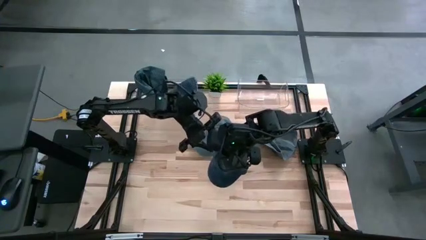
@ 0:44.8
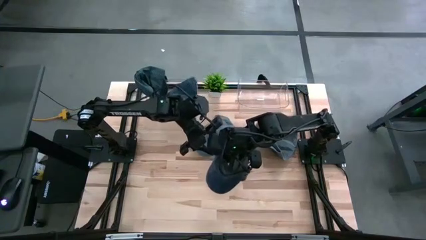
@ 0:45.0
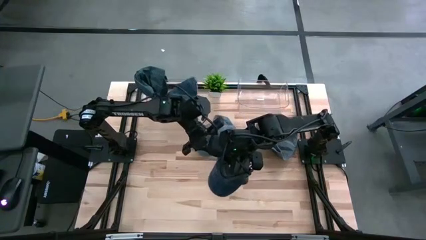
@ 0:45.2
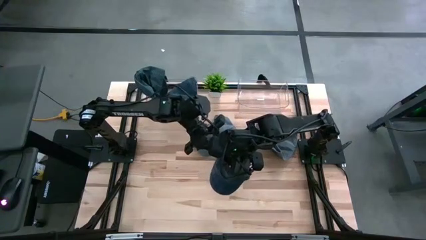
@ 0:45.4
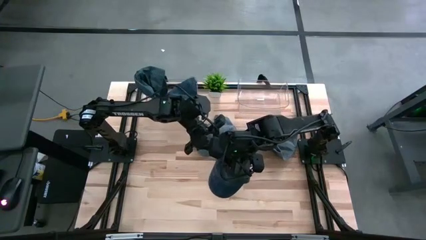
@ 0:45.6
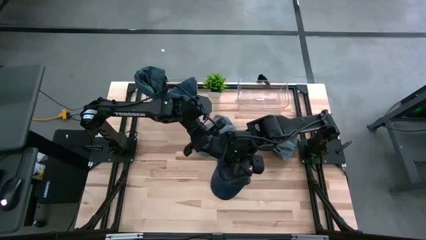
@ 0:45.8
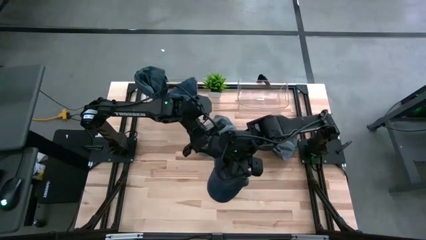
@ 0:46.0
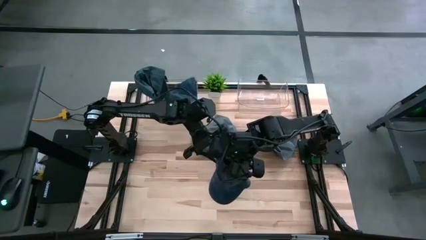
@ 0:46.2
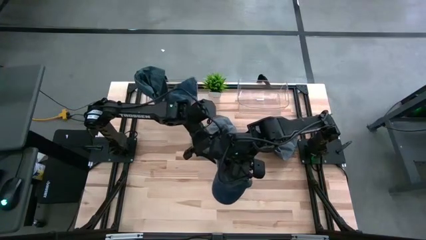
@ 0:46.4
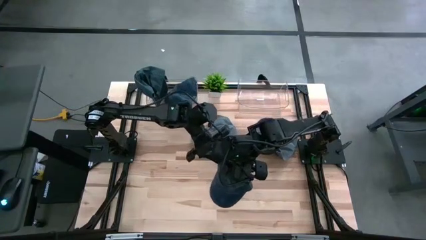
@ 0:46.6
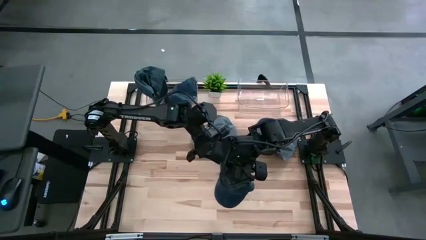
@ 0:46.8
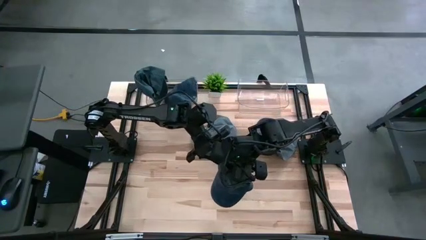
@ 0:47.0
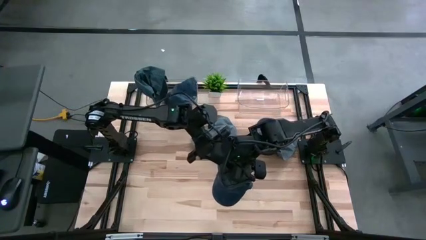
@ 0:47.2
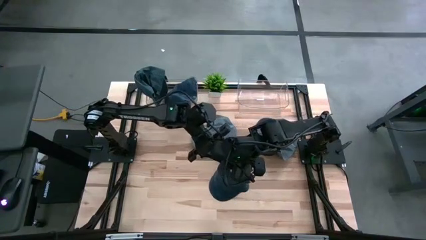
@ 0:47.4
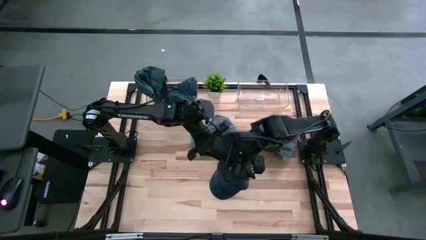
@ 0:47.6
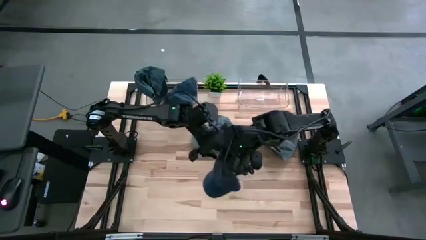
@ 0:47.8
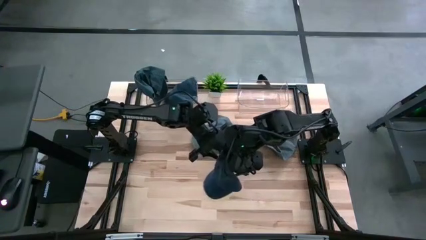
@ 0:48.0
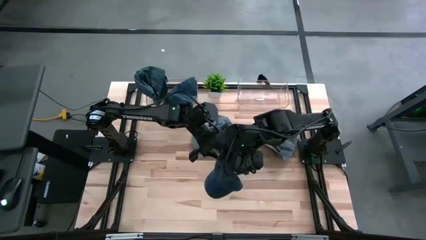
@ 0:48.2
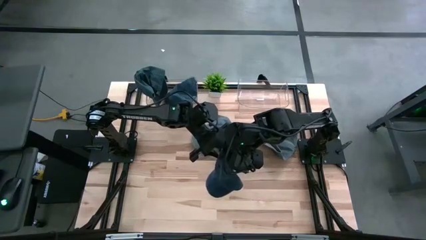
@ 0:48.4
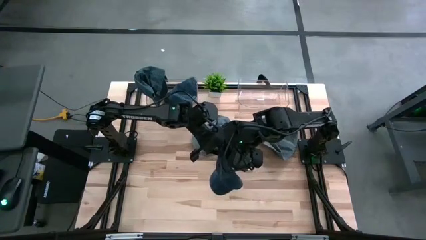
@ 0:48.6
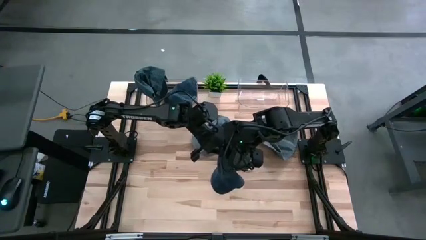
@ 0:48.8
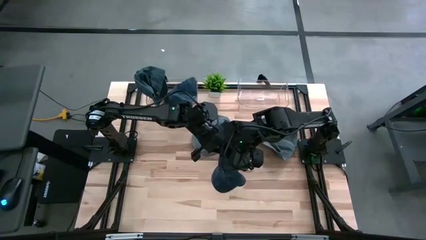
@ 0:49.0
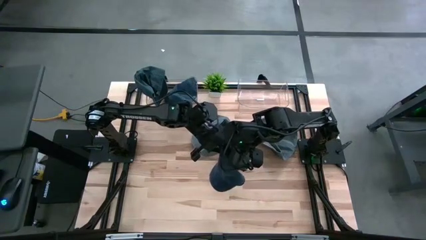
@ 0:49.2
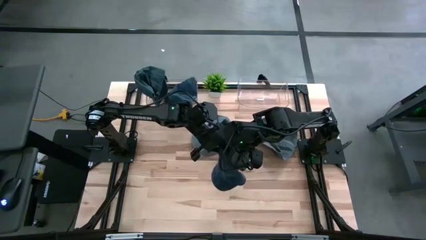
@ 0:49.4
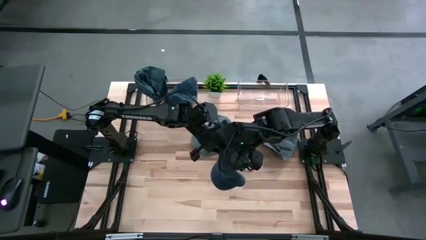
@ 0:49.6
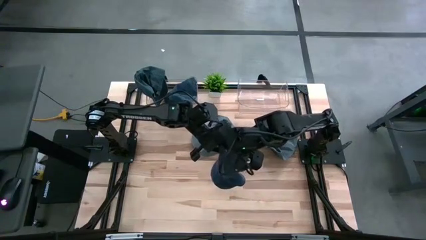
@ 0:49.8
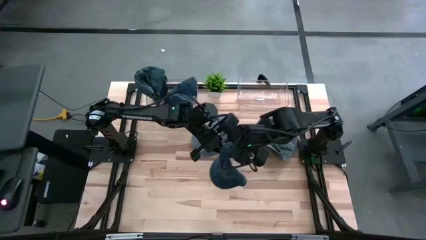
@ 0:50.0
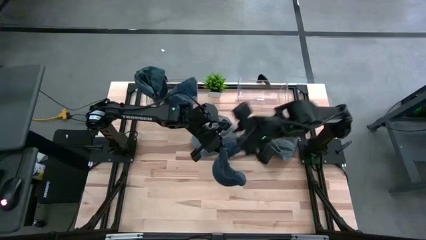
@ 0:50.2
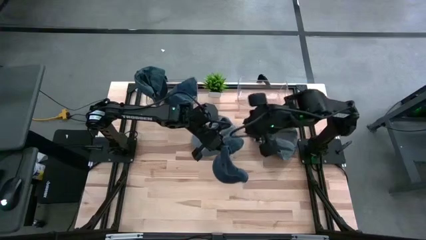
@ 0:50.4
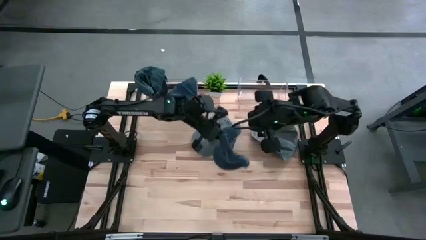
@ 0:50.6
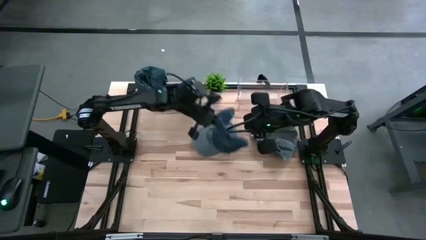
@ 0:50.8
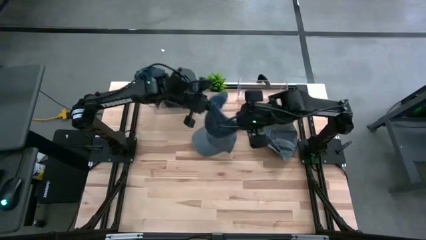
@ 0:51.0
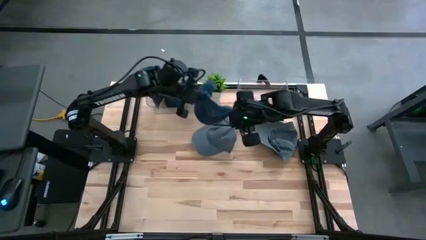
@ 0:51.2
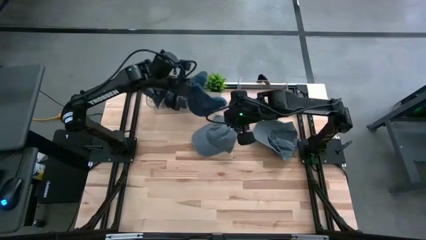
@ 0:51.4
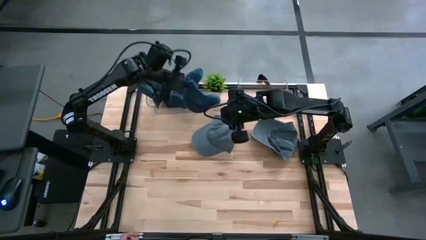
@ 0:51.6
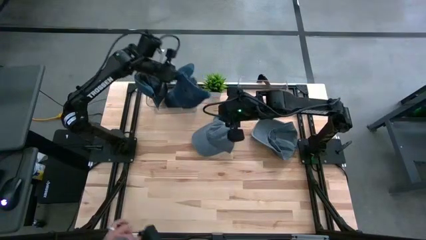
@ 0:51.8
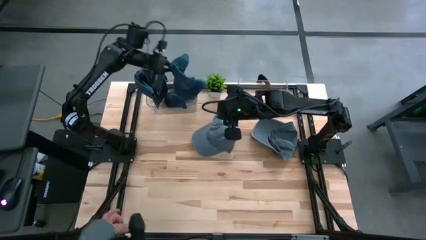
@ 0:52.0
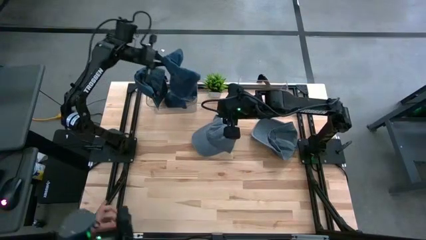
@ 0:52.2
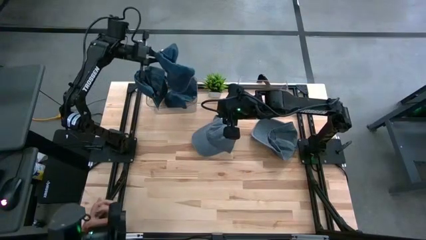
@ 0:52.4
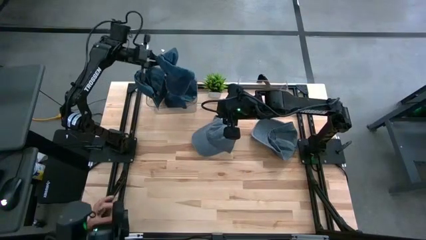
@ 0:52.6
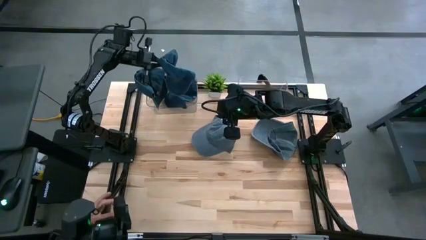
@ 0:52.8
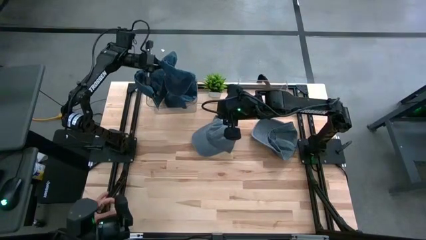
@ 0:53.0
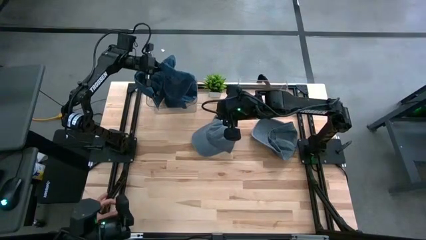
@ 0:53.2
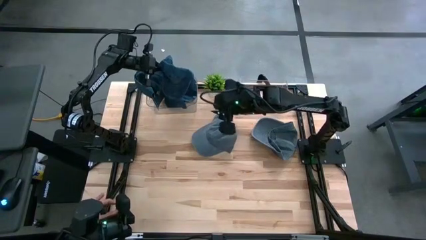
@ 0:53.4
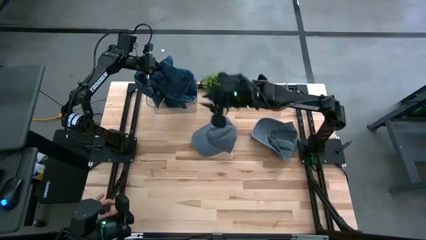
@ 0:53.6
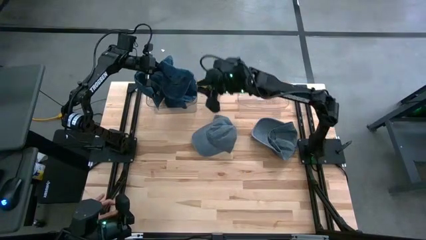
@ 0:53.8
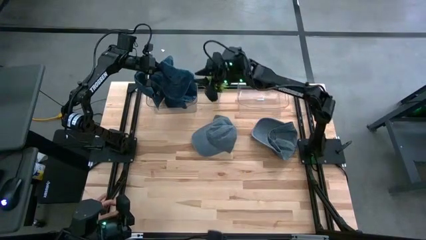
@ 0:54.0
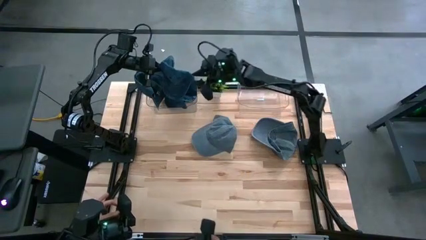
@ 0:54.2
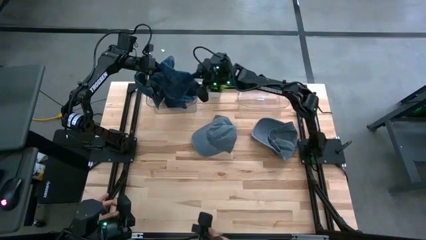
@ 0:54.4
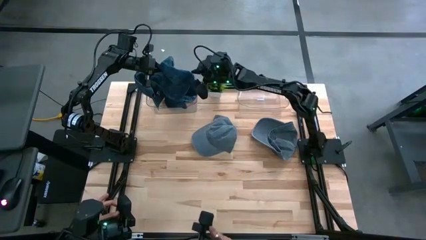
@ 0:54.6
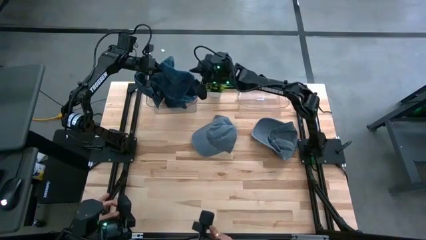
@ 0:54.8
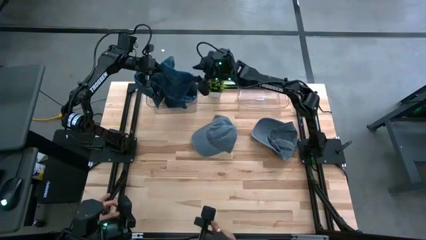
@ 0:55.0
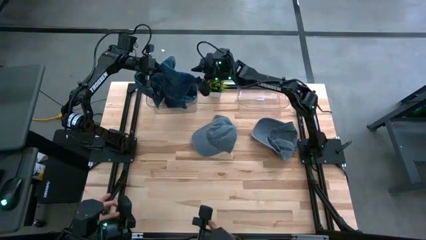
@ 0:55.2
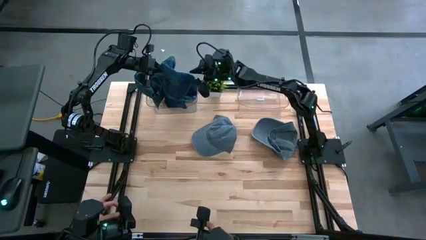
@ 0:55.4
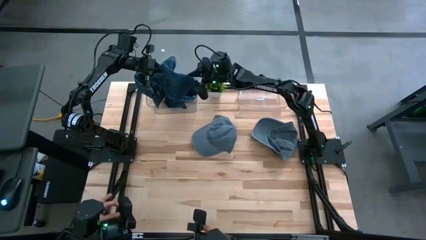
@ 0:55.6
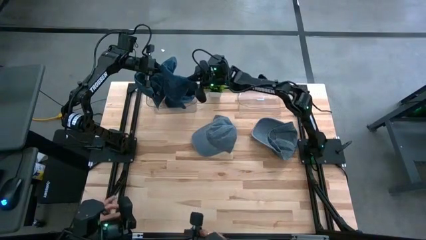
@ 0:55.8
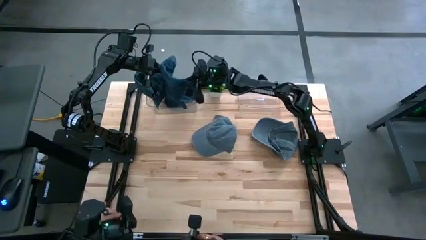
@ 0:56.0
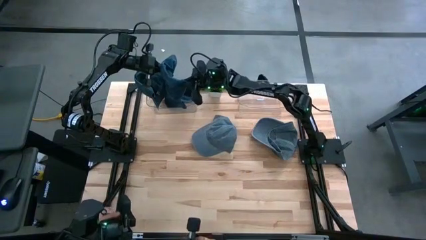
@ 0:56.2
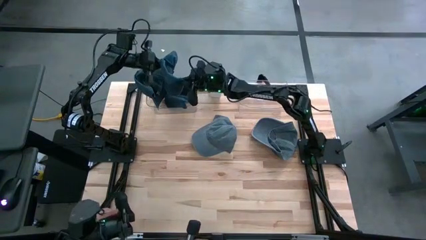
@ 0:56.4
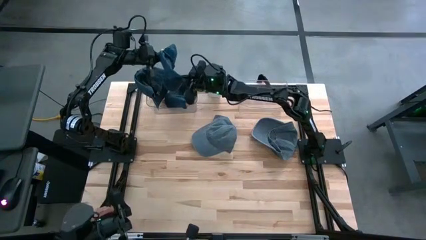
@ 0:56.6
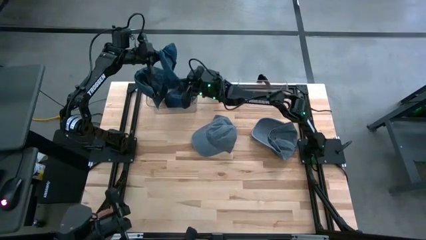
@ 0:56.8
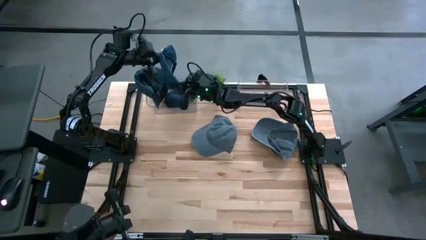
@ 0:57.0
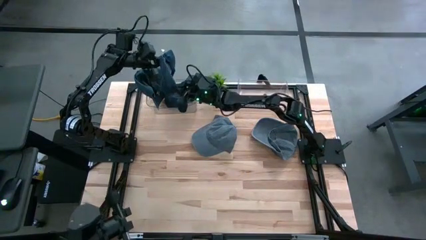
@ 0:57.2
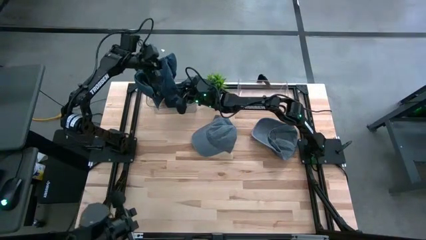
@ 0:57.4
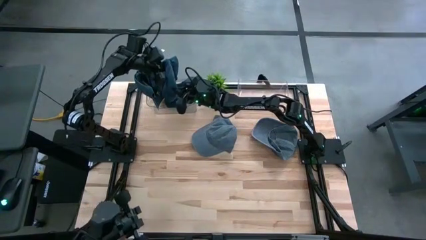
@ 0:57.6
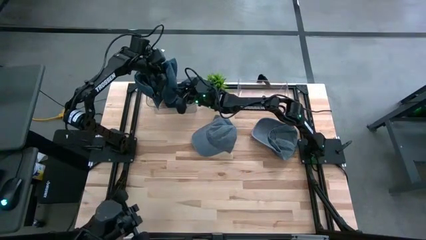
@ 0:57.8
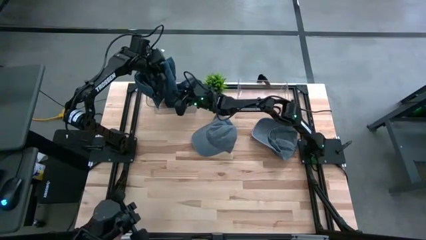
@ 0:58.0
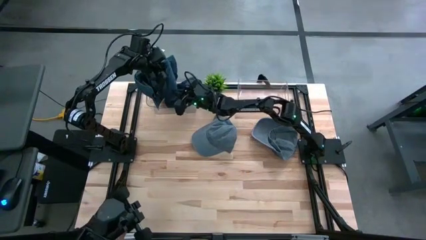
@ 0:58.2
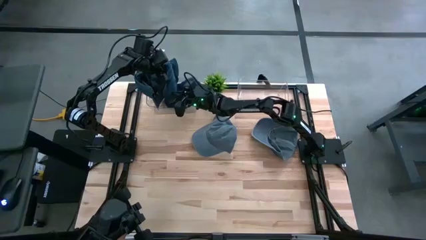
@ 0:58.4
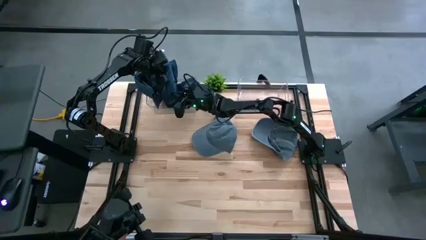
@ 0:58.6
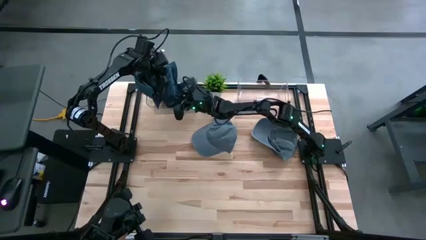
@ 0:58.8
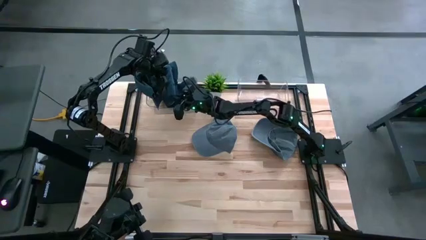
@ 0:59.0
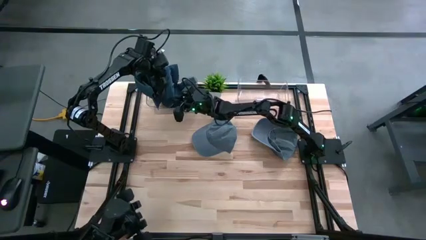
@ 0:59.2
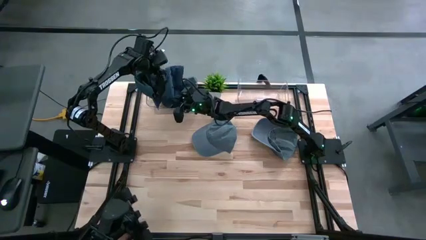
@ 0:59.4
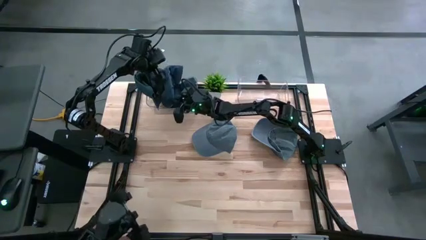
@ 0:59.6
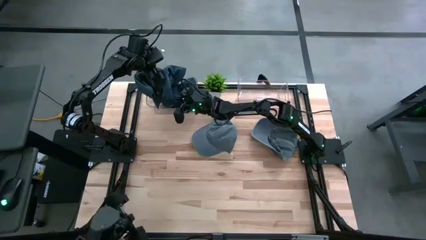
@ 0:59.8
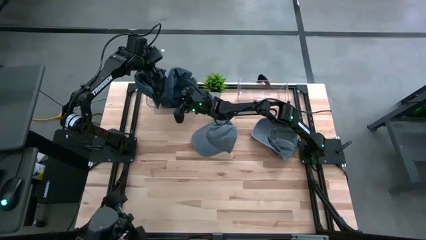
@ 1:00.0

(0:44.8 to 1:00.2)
Task: Pick & Place hat
Put the dark blue cap into the left transparent bin
